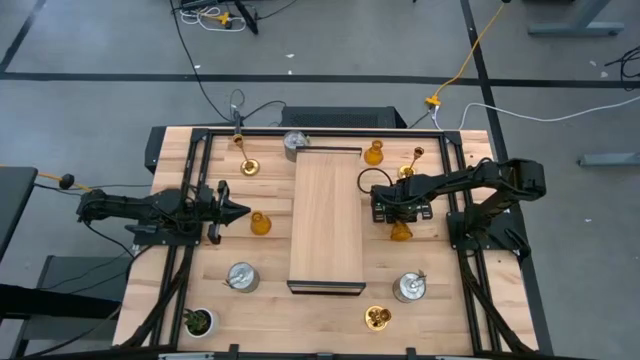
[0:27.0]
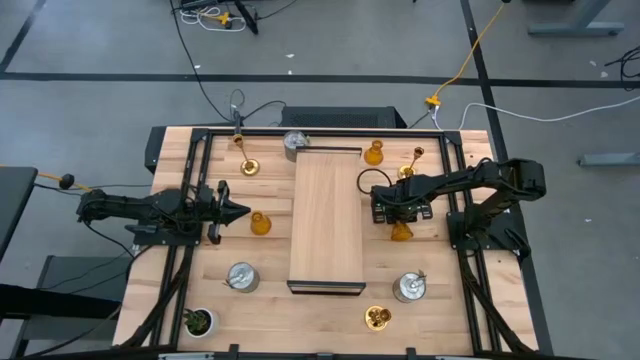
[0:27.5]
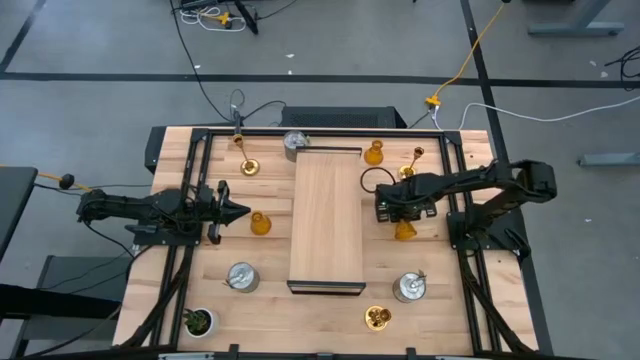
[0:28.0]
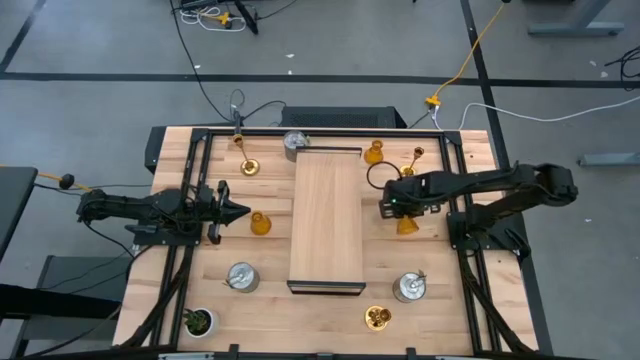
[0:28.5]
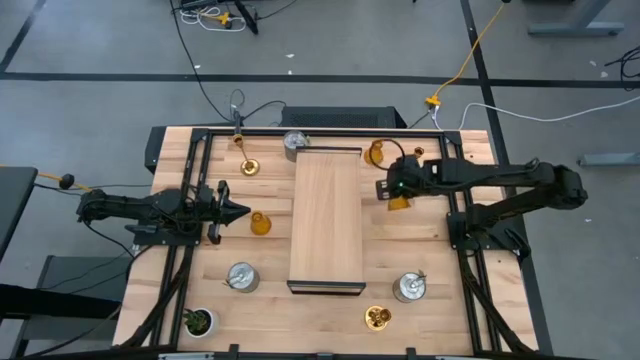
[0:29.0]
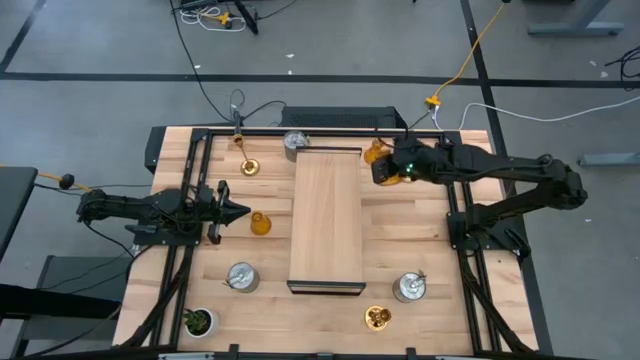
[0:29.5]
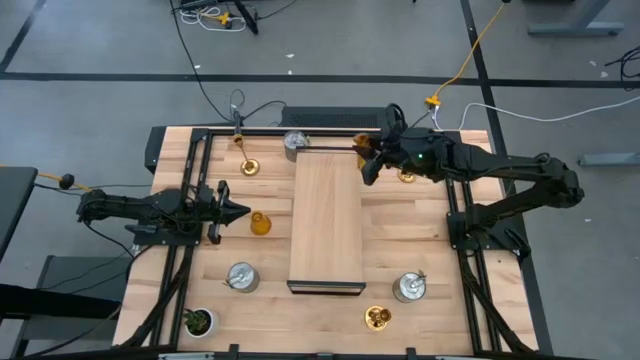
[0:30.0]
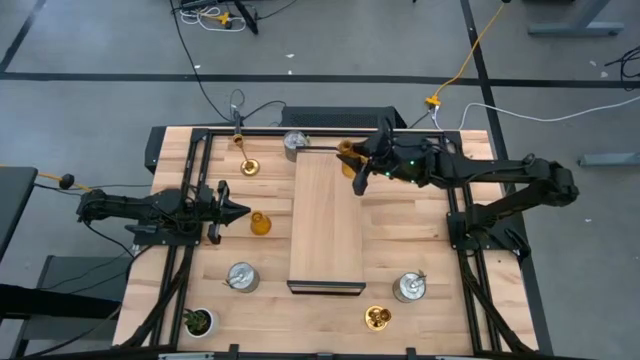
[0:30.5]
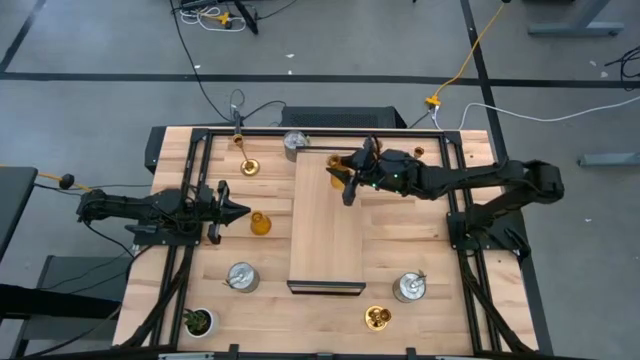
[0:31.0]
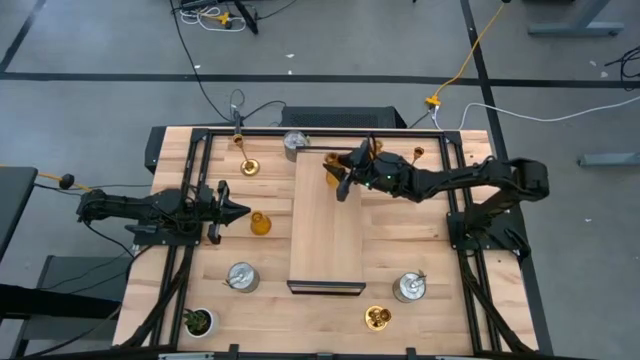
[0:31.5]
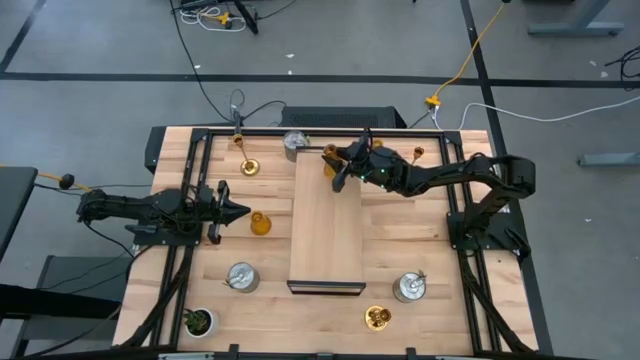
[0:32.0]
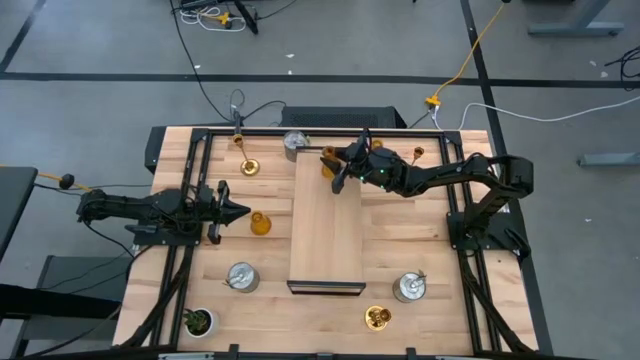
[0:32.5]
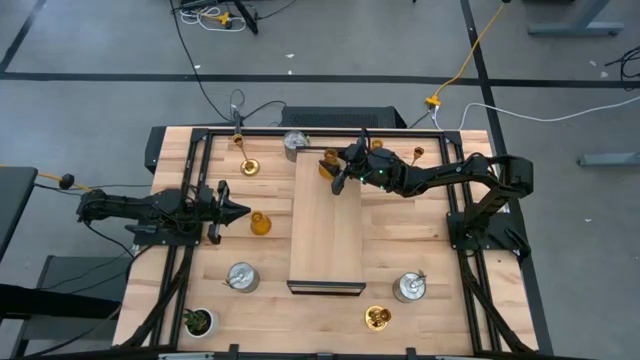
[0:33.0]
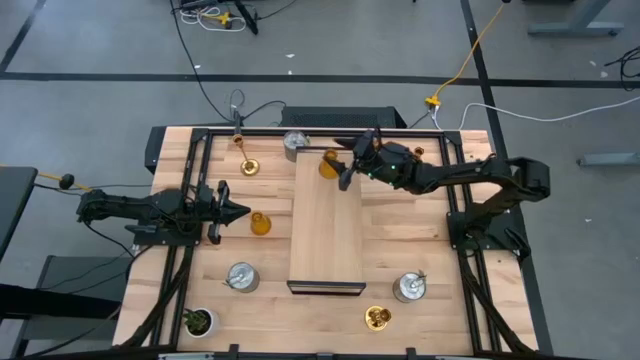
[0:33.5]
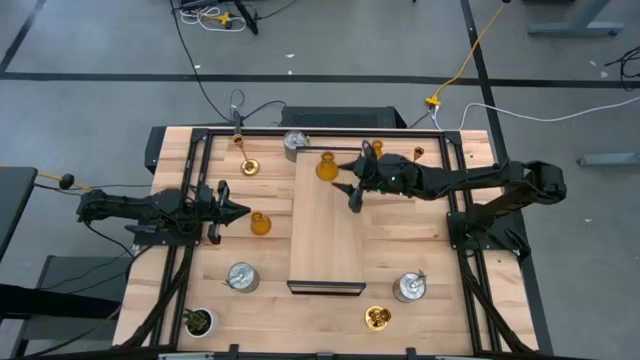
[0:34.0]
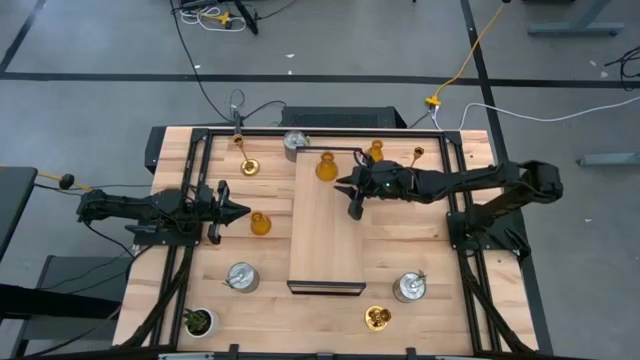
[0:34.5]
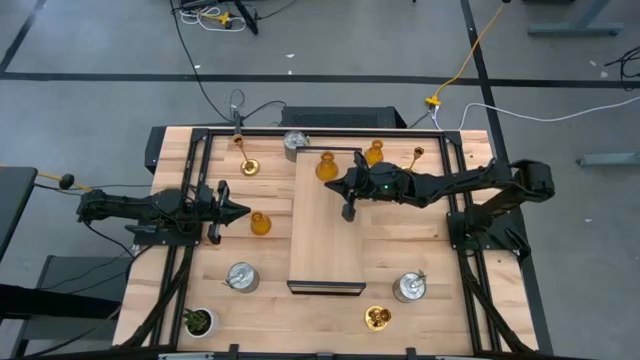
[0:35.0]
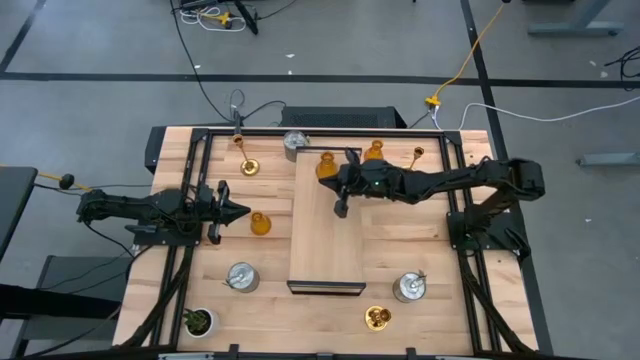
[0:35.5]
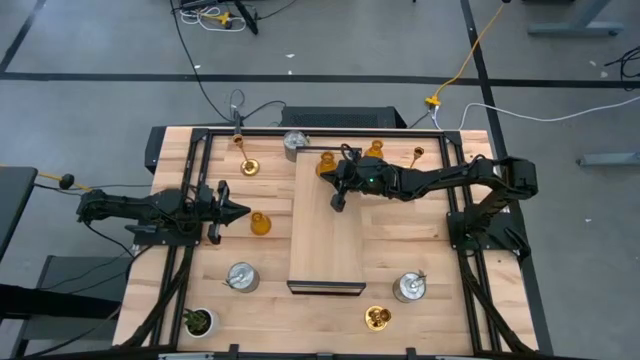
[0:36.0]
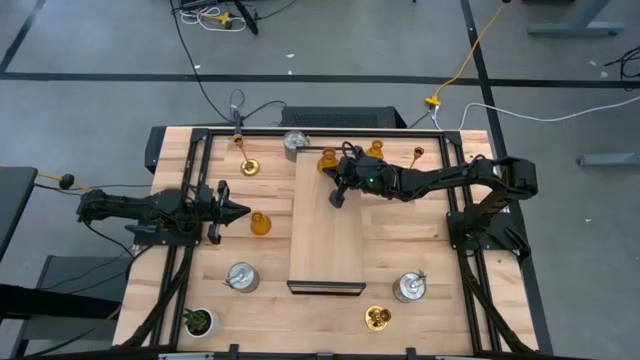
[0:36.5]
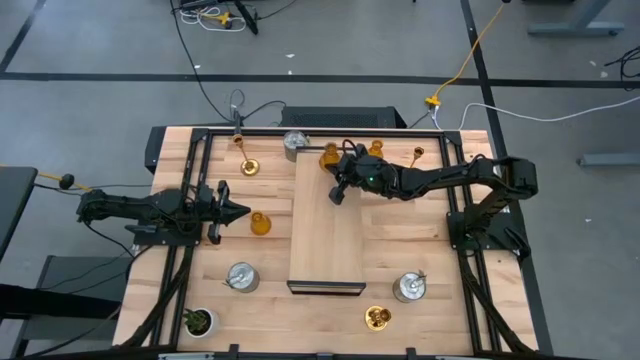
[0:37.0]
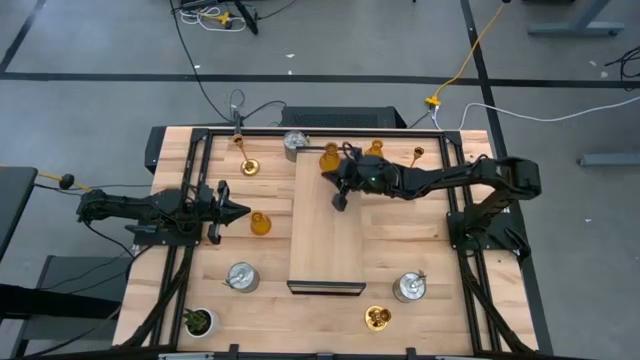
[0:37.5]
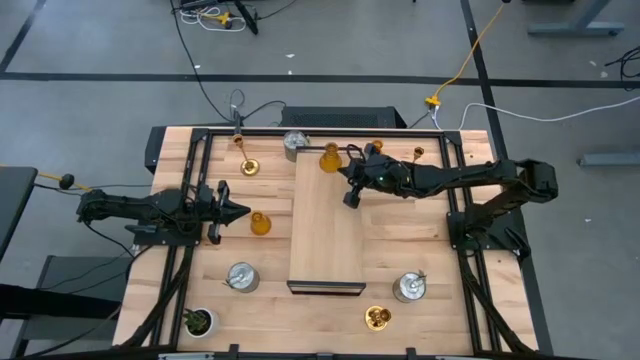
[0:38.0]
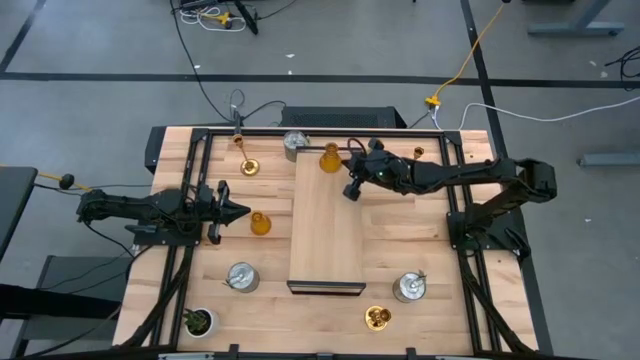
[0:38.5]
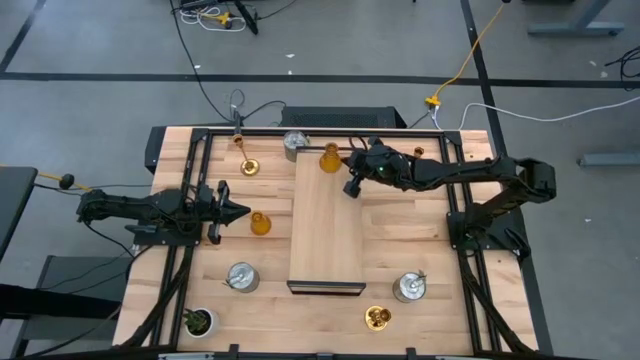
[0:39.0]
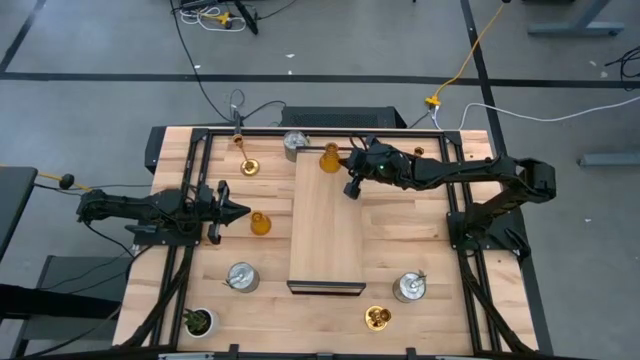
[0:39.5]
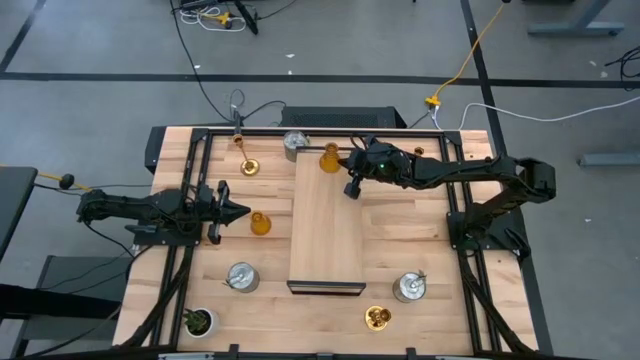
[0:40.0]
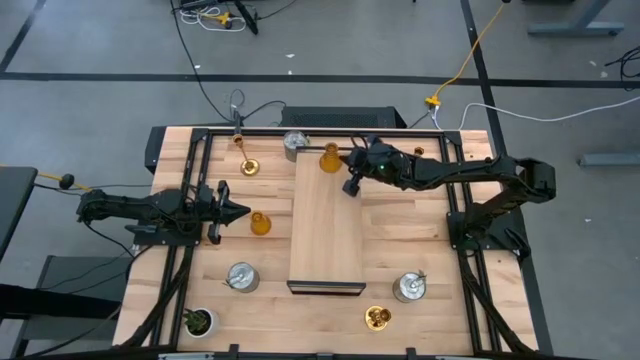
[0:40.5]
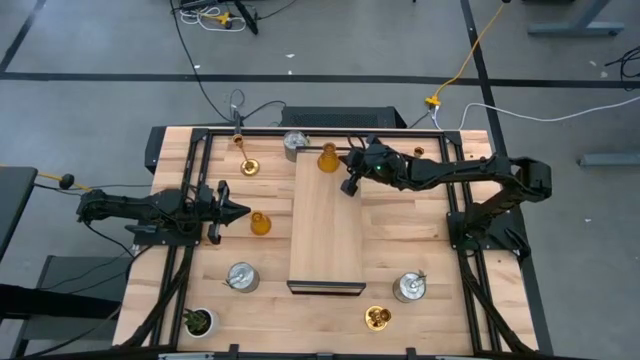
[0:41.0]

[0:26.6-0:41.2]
Task: Pick & Place candle stick holders
Put the bottom right glass candle holder on the shelf

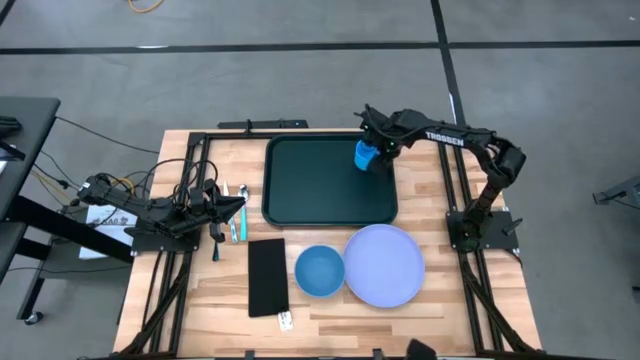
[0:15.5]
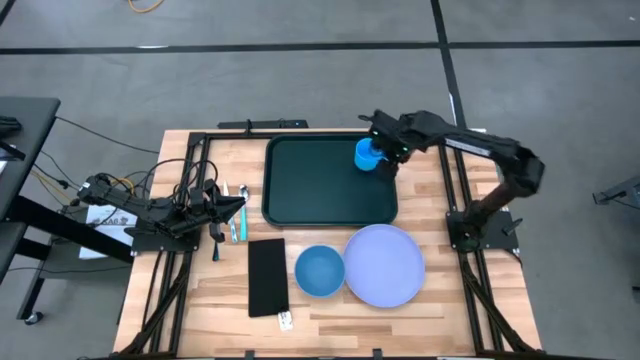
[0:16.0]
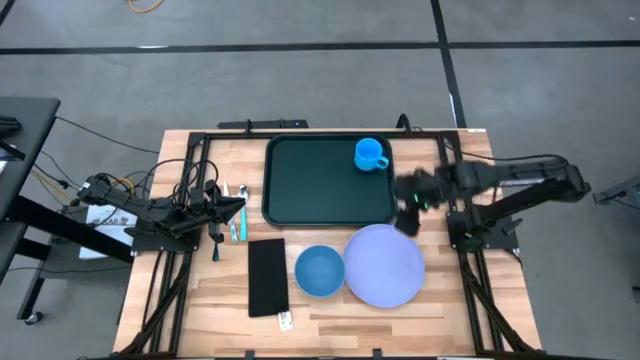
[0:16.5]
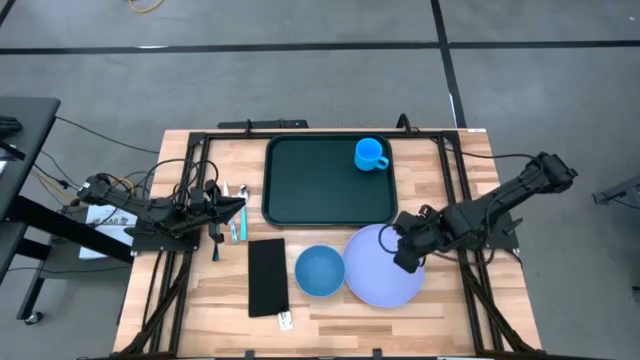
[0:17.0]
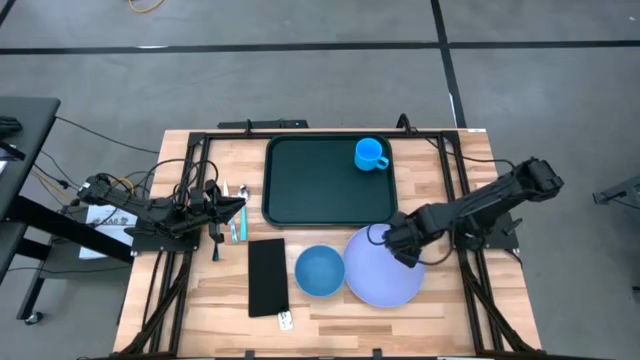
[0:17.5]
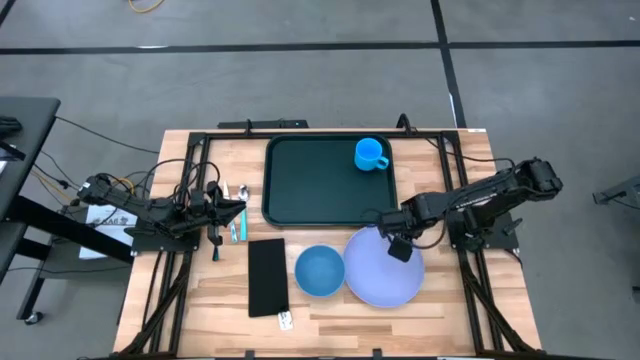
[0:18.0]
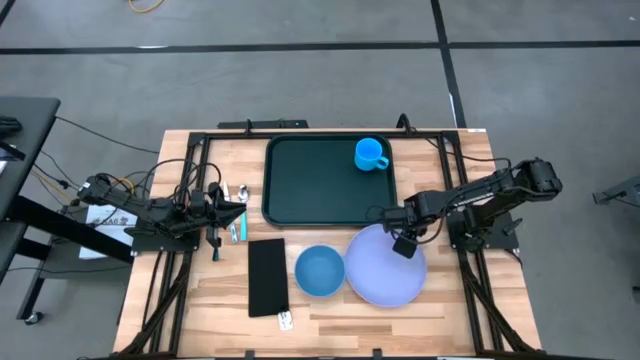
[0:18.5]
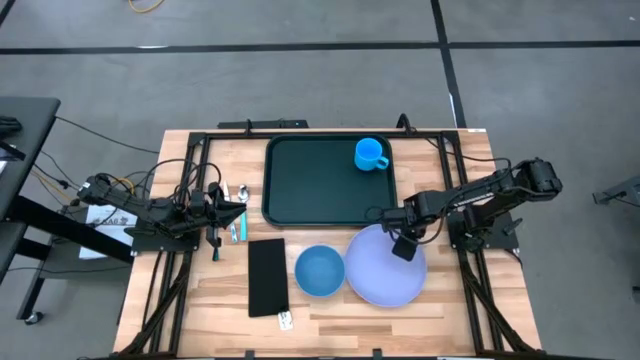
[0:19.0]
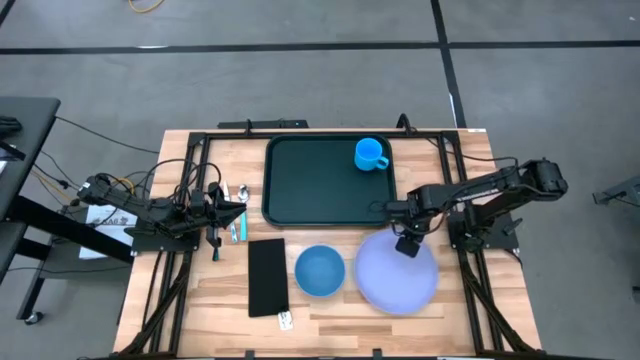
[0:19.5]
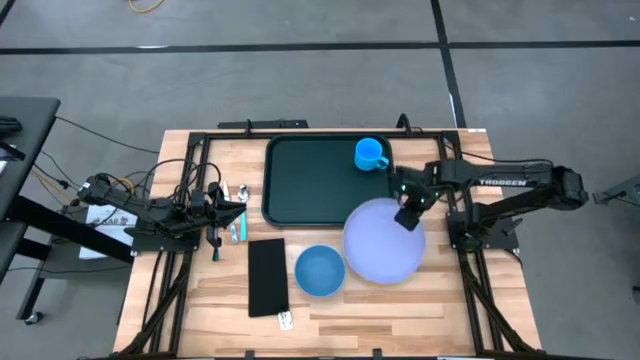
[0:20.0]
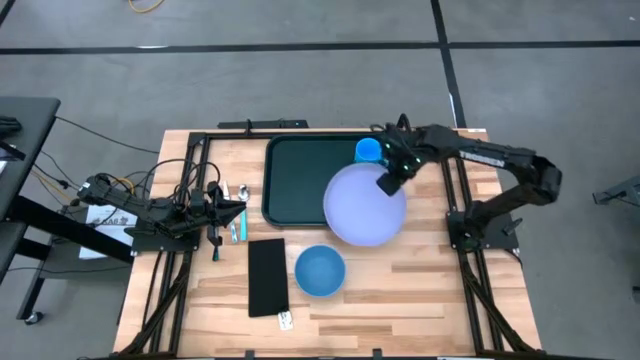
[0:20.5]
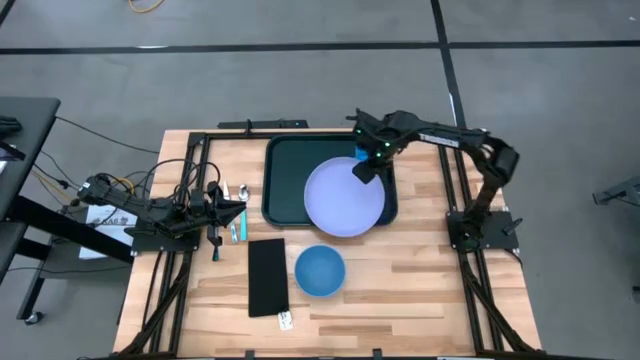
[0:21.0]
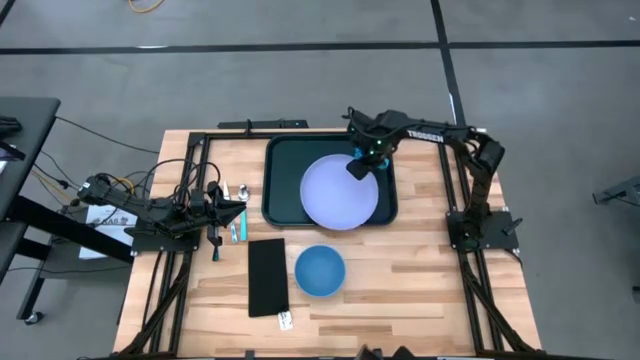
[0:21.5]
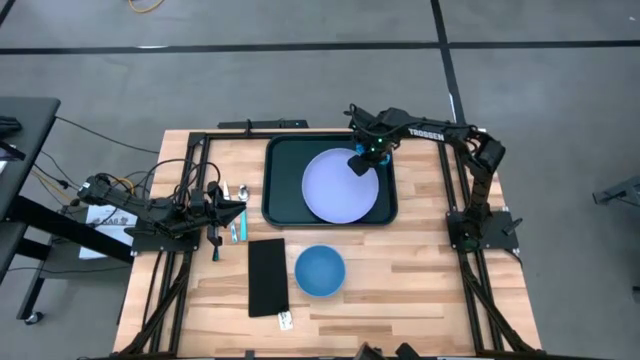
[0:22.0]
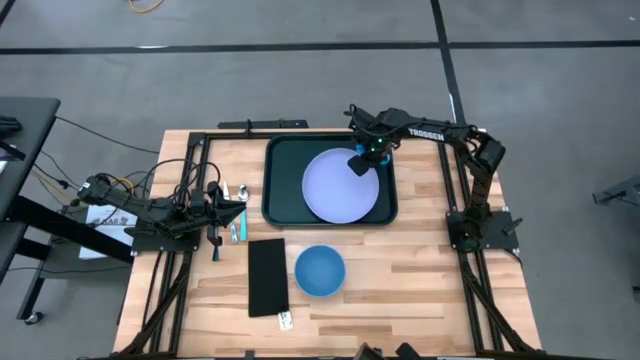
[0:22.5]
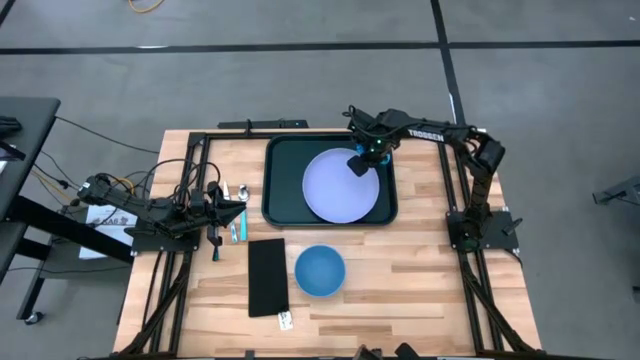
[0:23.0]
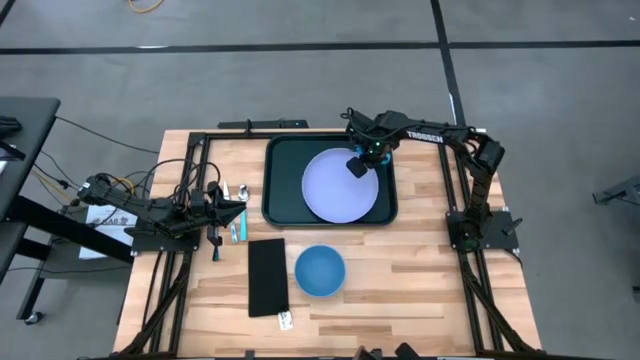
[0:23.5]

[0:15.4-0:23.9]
Task: Set up tray
Put the purple plate in the center of the black tray
